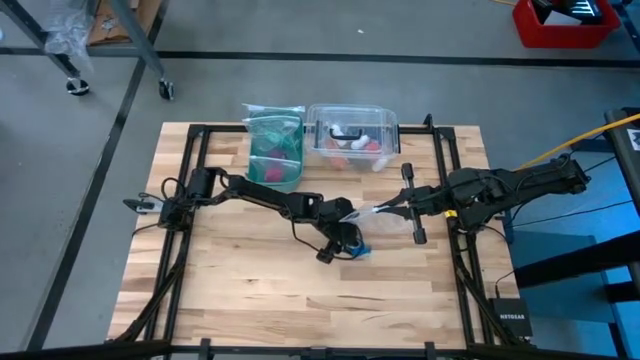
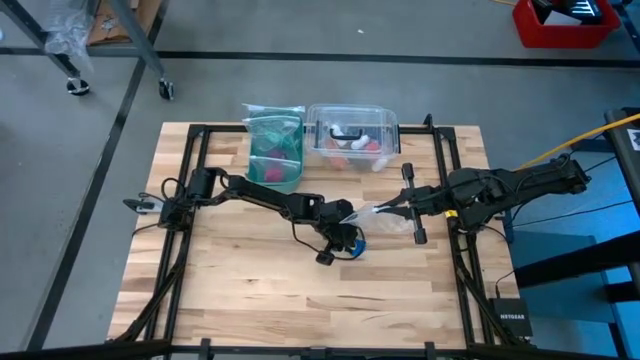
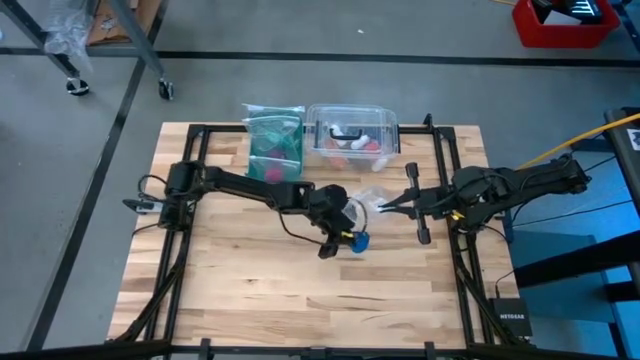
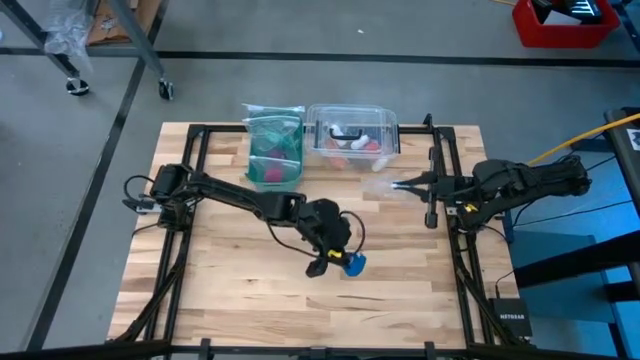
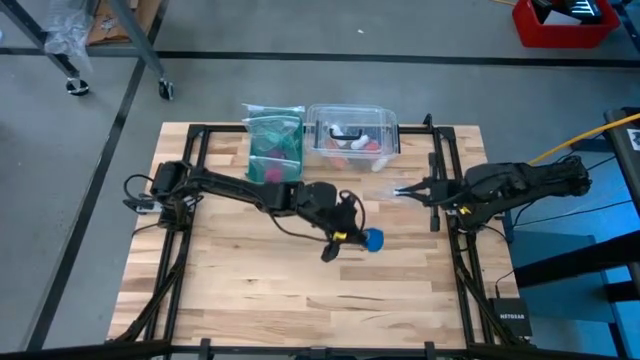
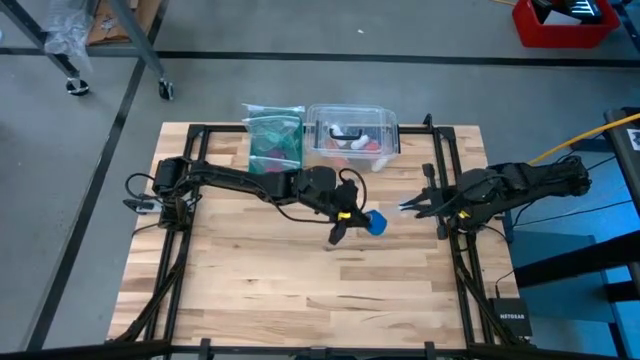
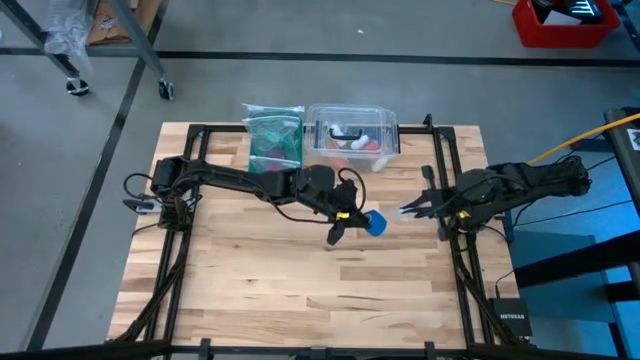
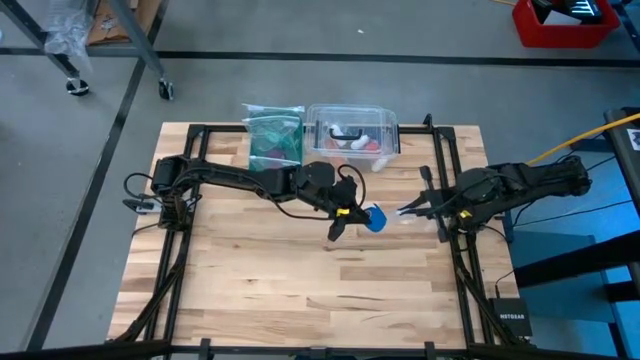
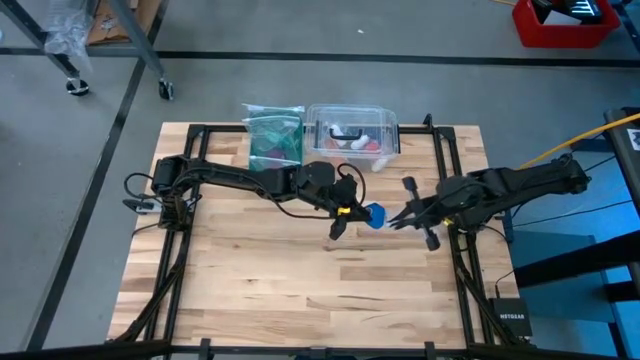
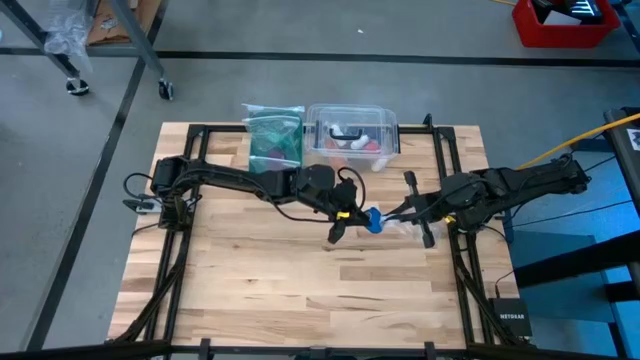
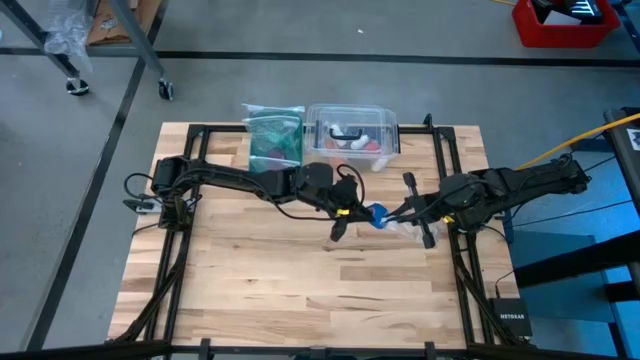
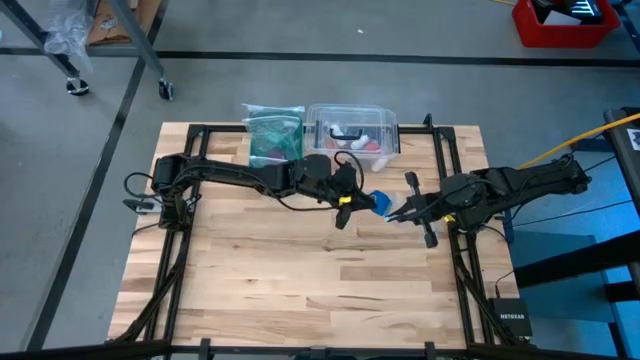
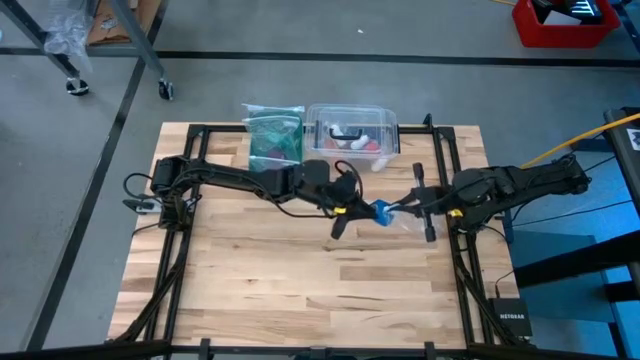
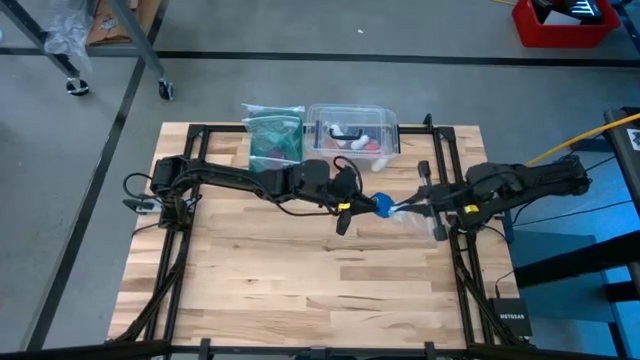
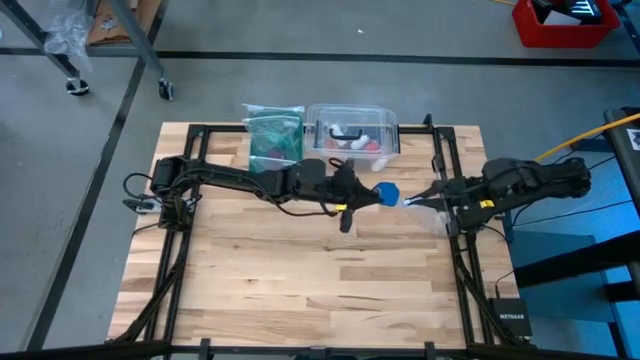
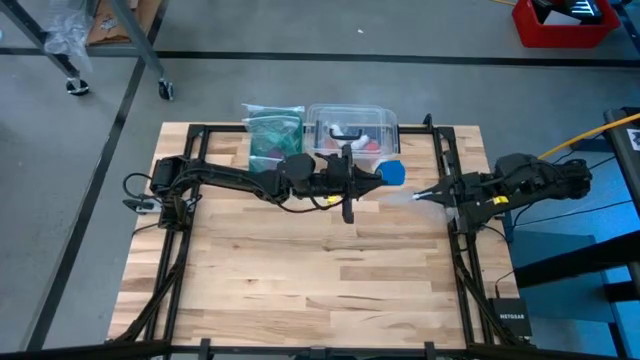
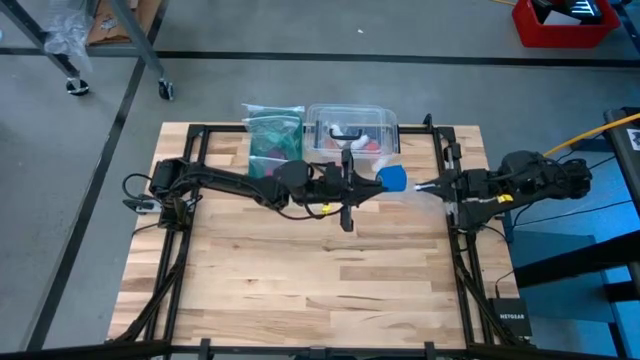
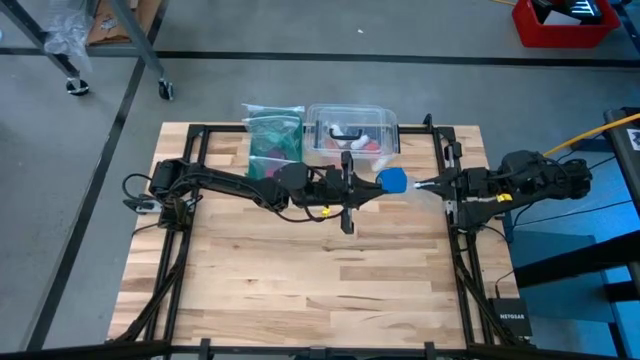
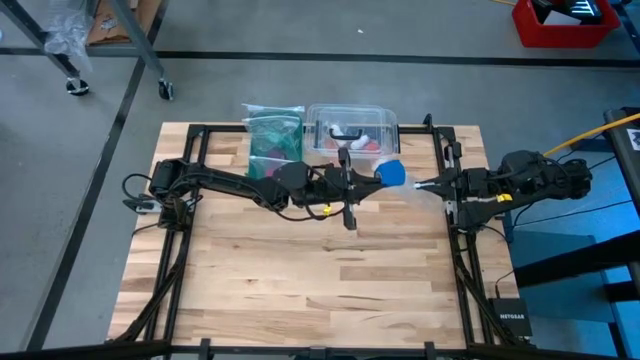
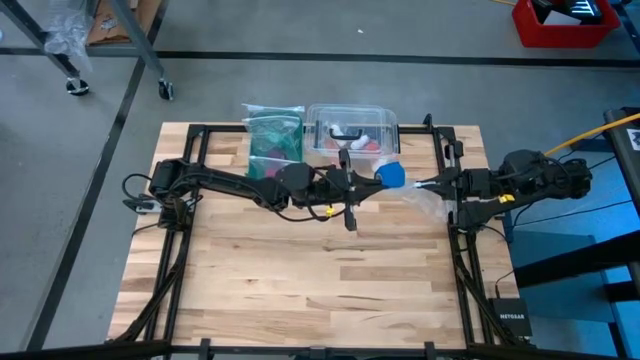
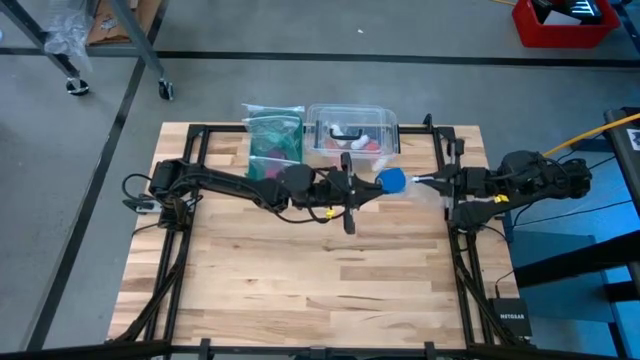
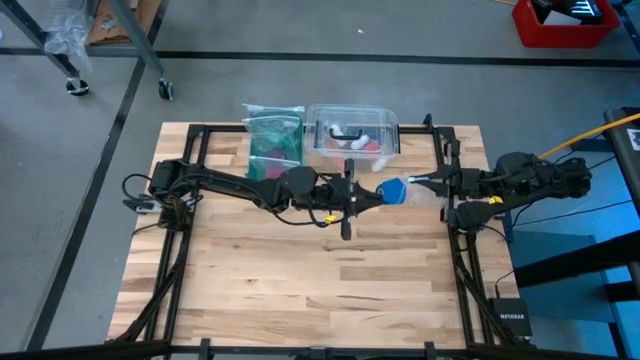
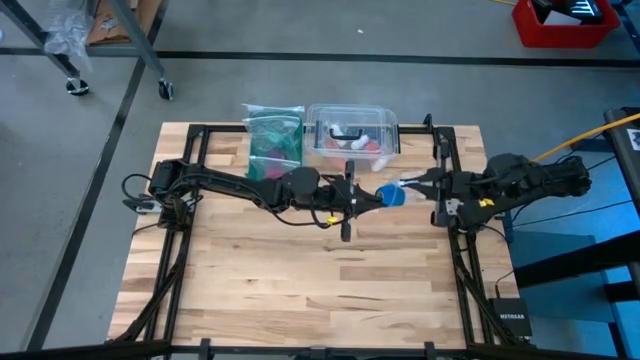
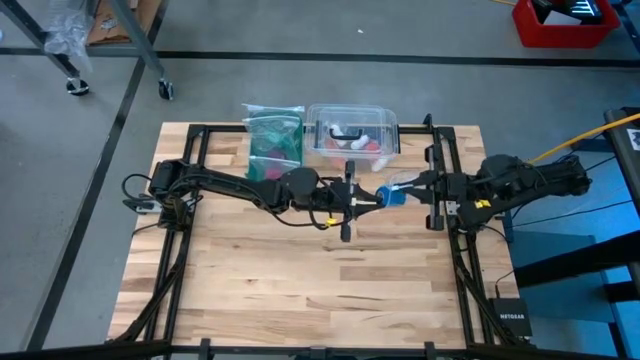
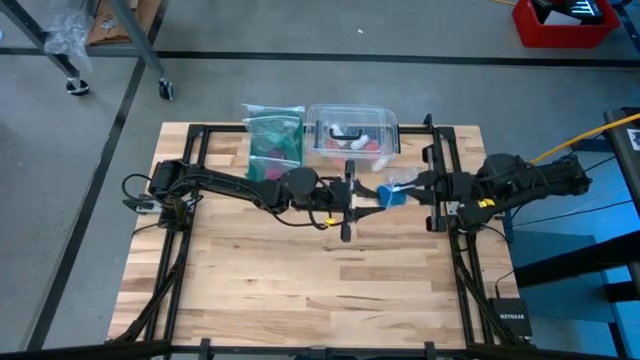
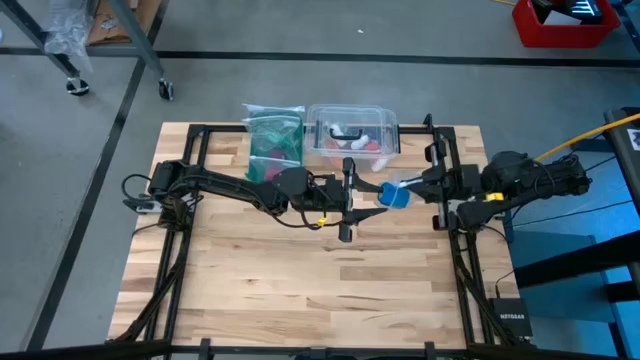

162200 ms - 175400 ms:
Task: Roll bandage
Put the blue bandage into the transparent zip bag

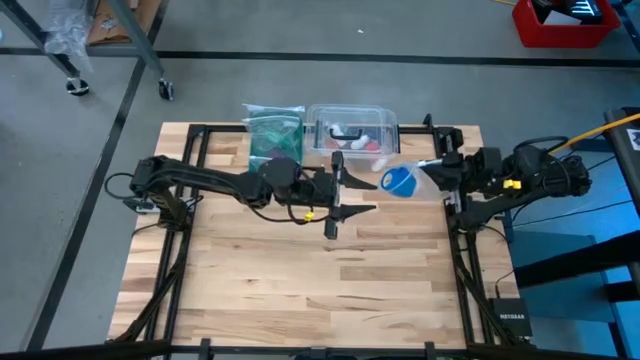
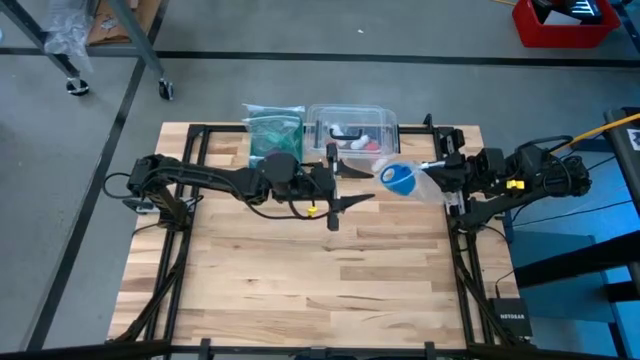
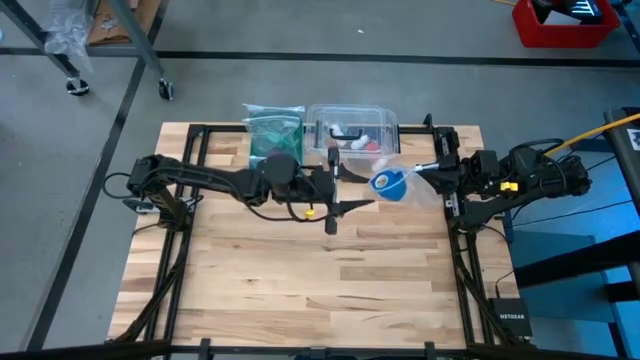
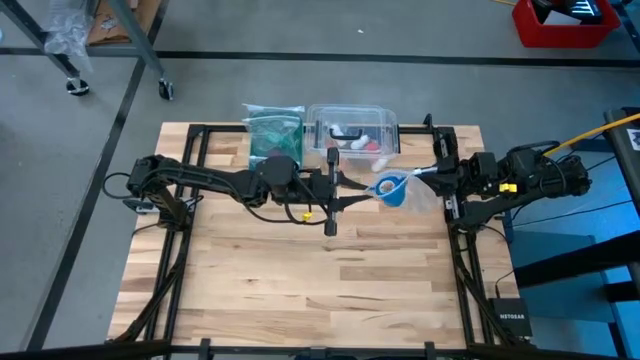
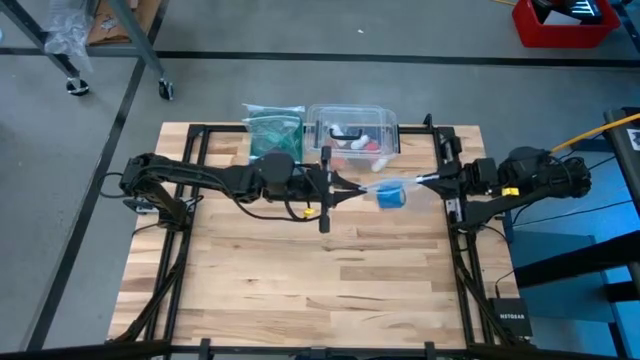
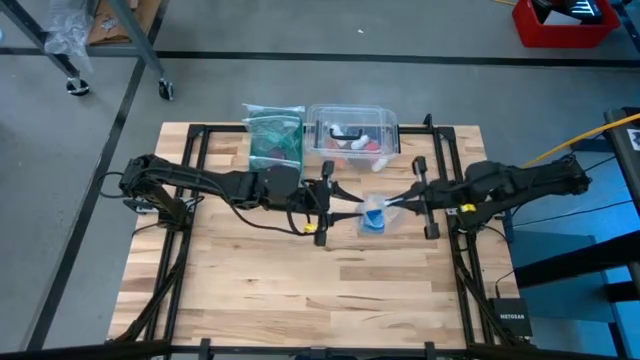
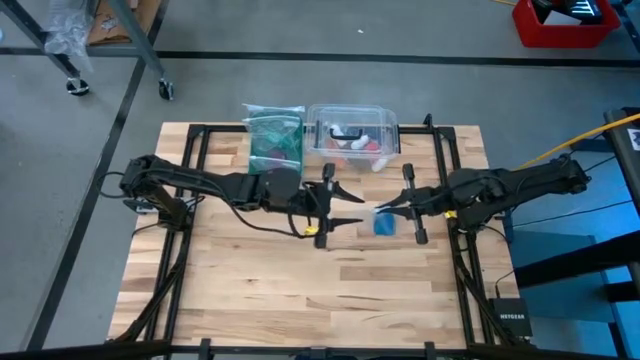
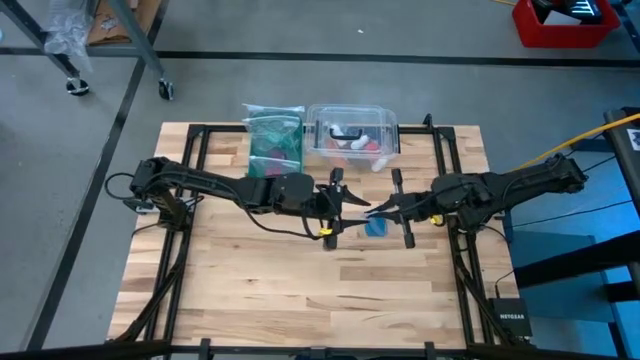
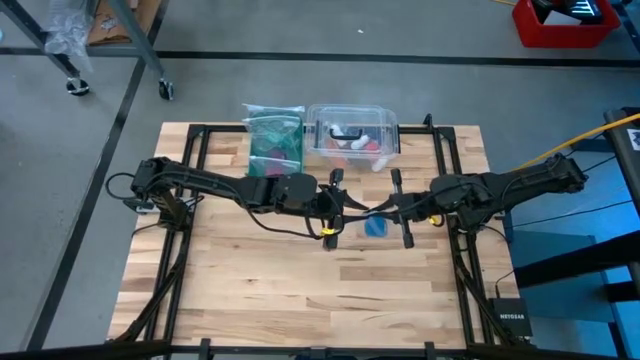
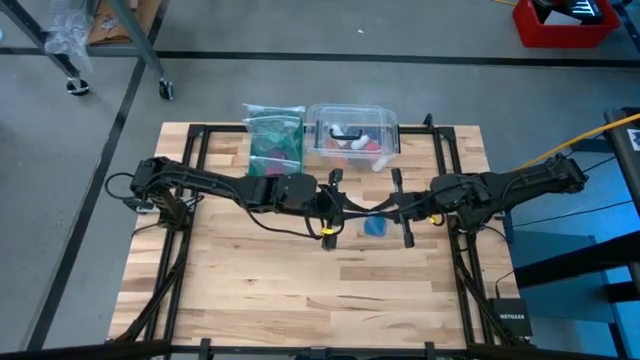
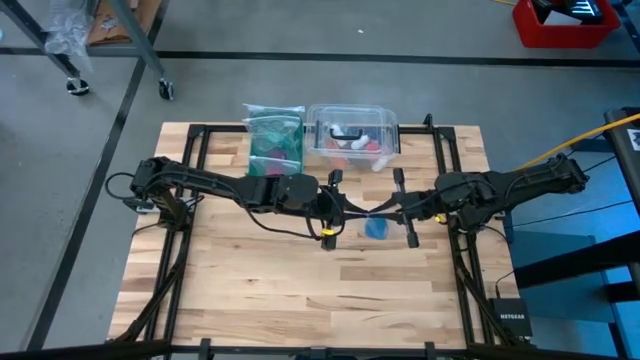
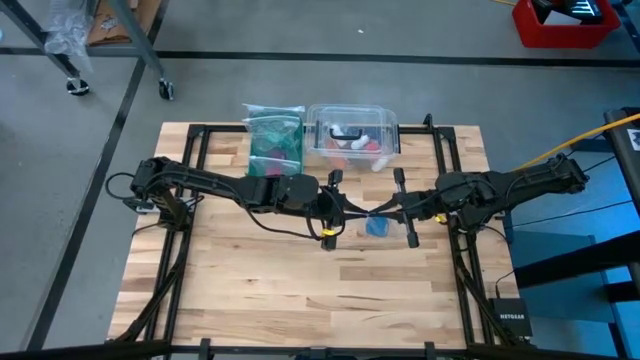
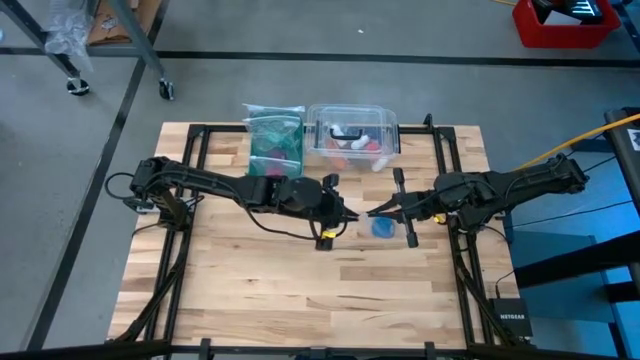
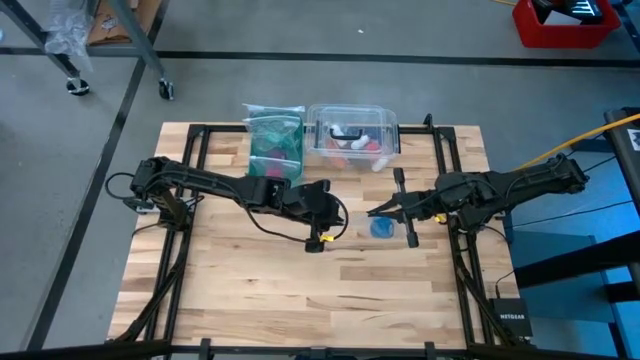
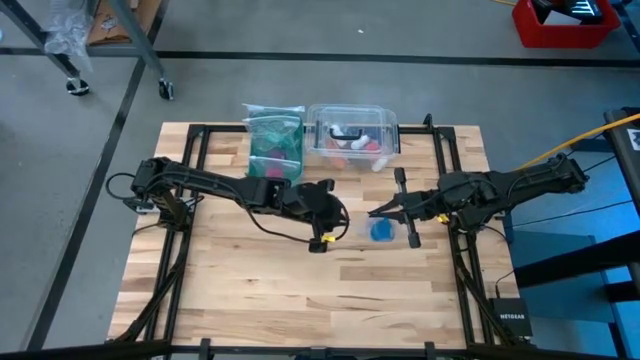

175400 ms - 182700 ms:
Close the transparent zip bag

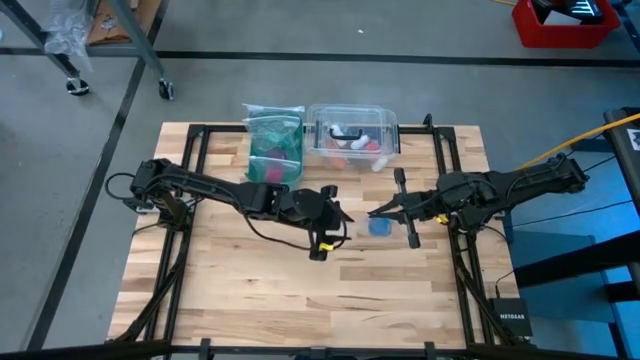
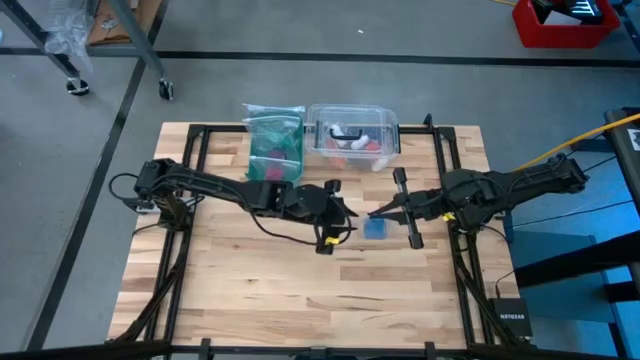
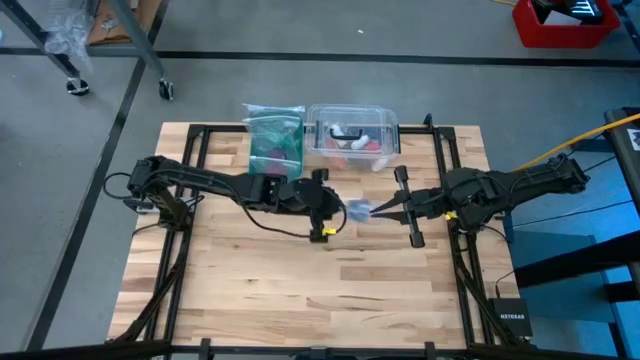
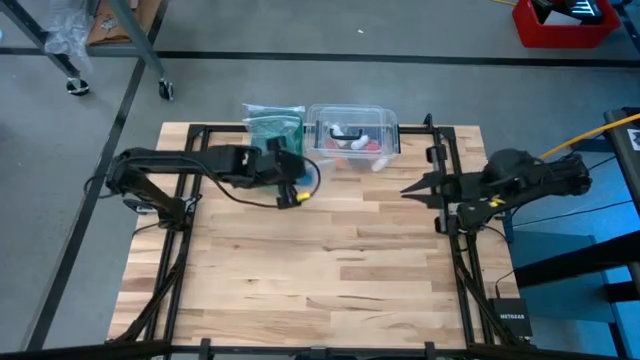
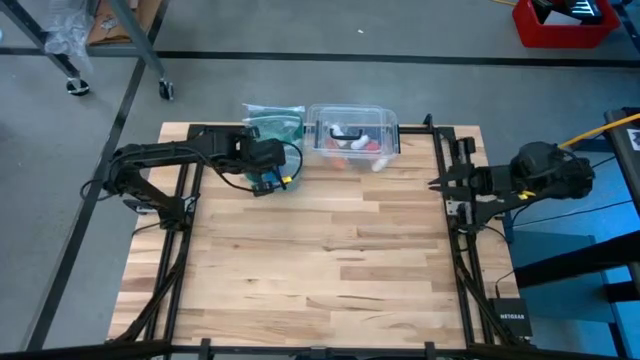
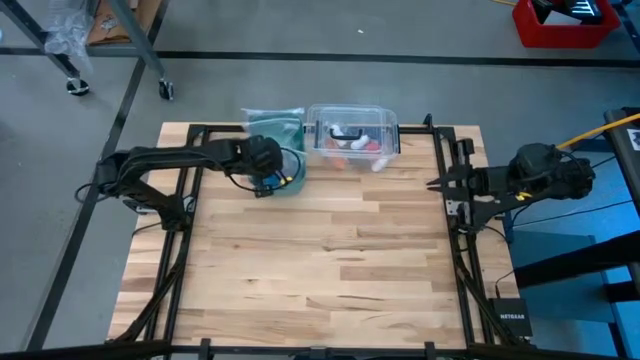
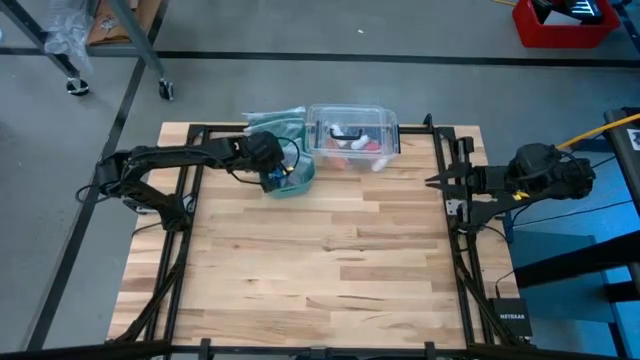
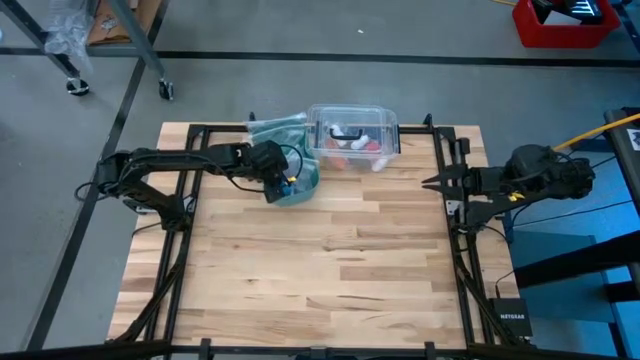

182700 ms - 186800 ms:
Put the transparent zip bag into the blue bin
